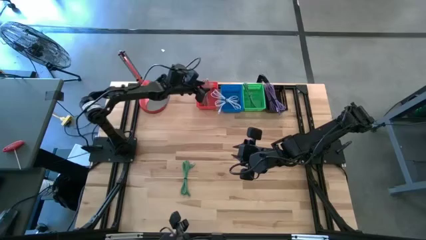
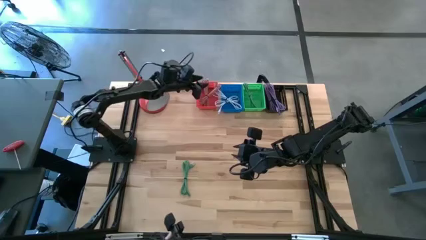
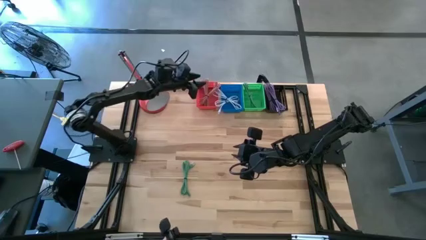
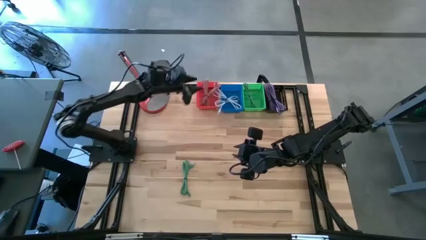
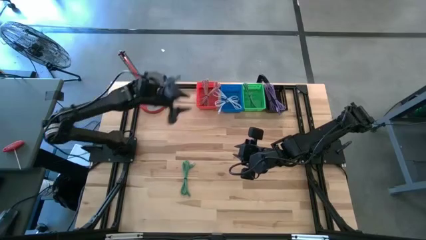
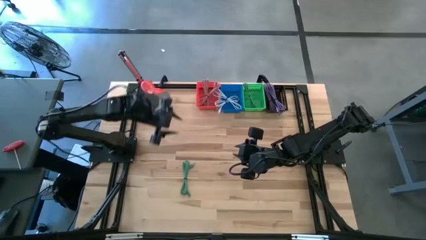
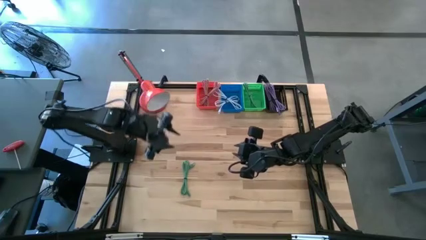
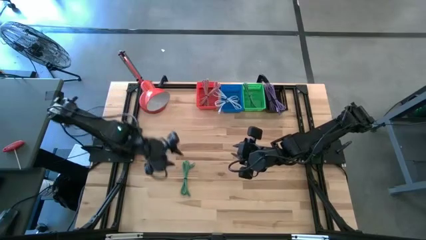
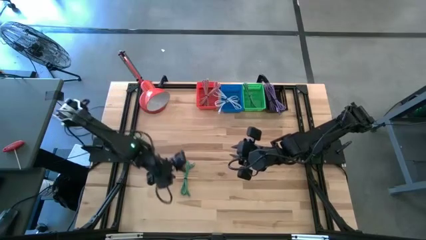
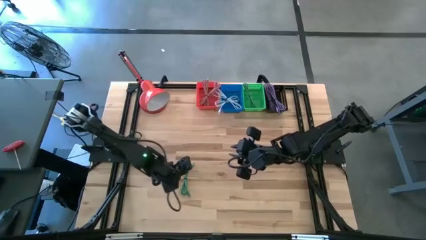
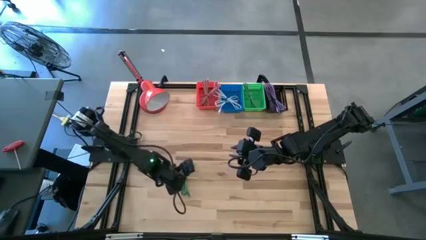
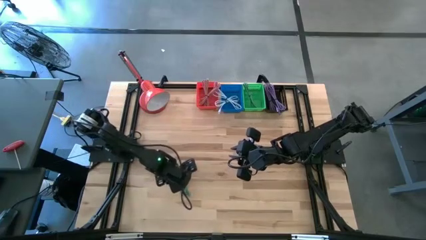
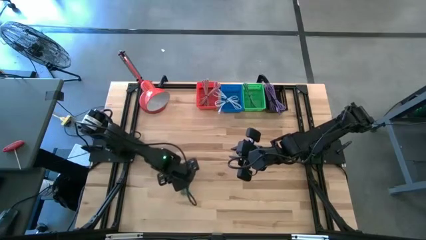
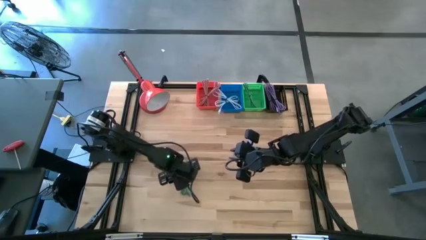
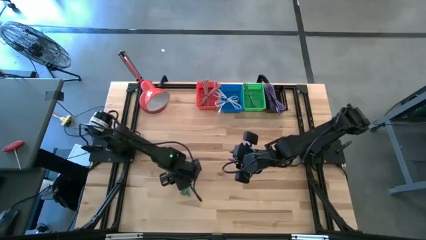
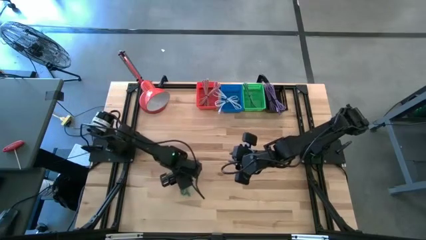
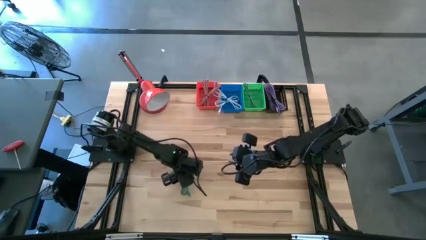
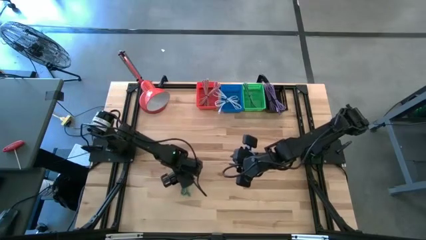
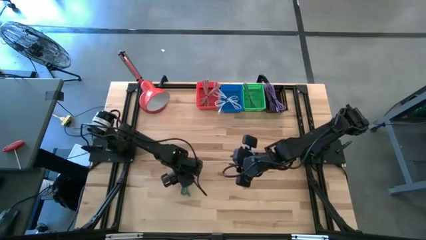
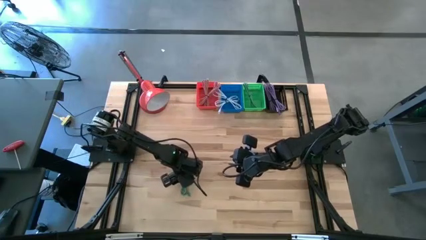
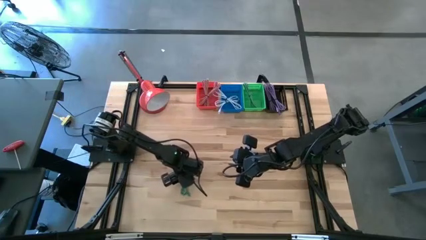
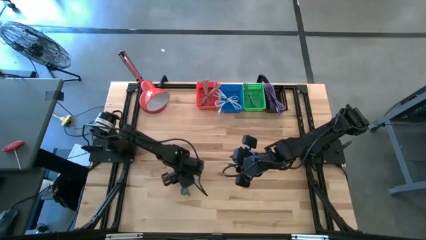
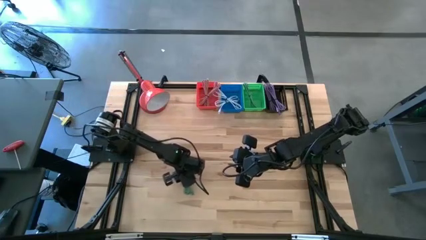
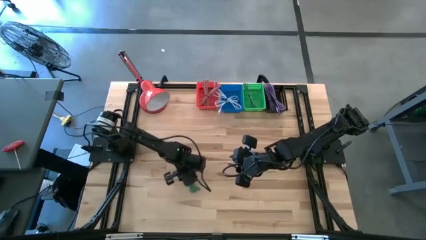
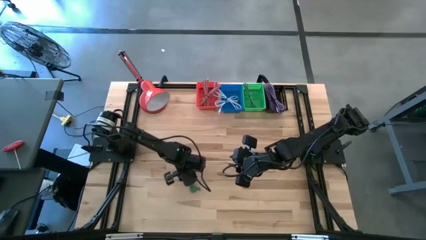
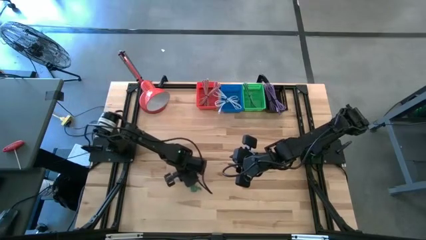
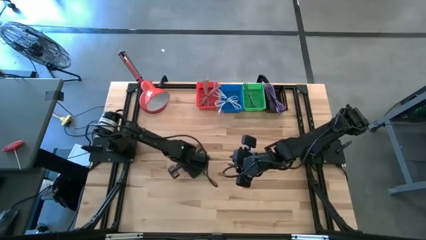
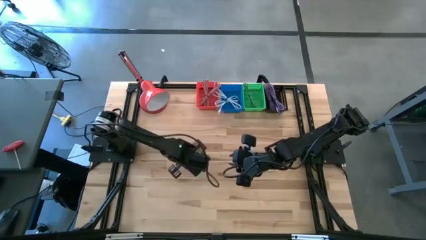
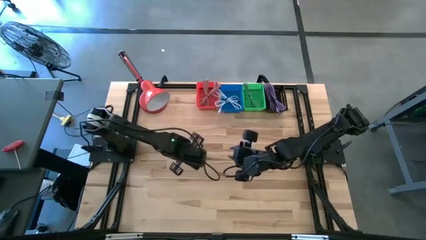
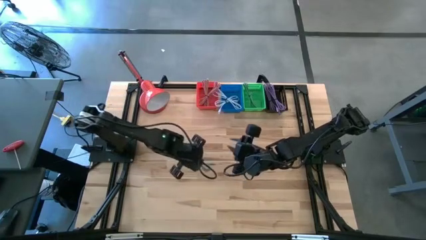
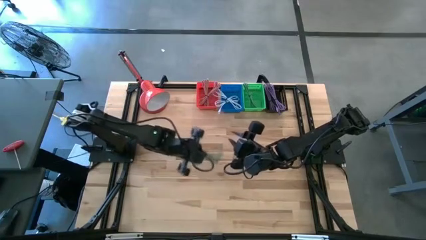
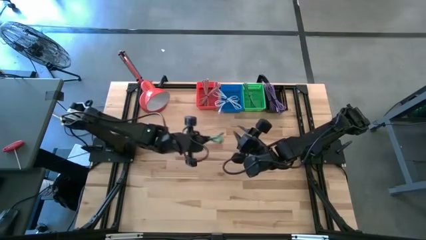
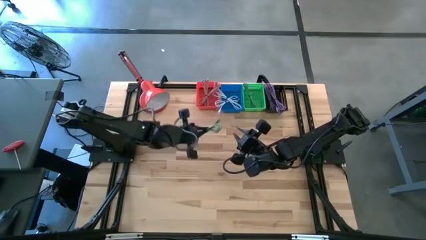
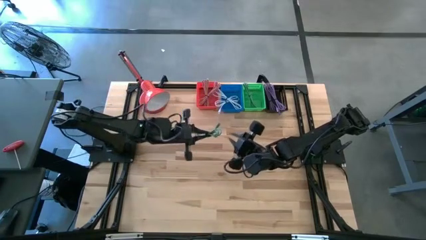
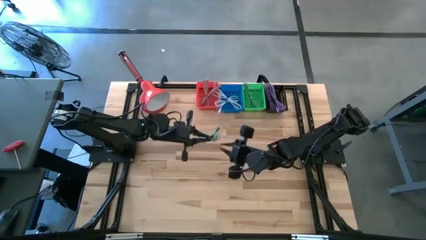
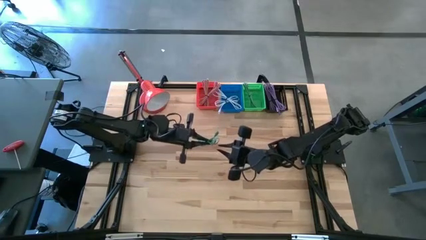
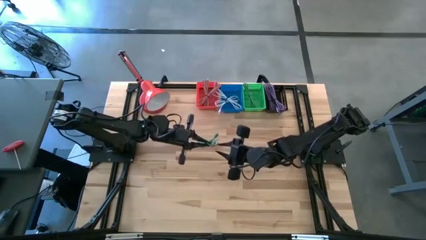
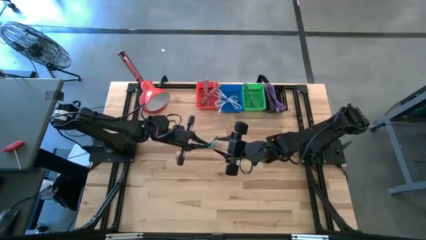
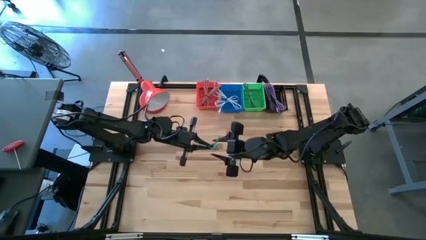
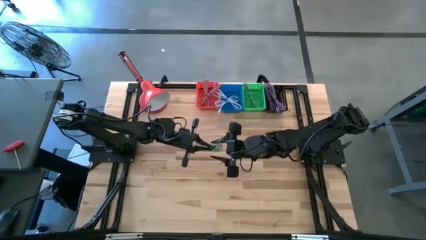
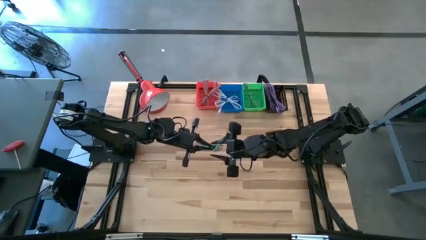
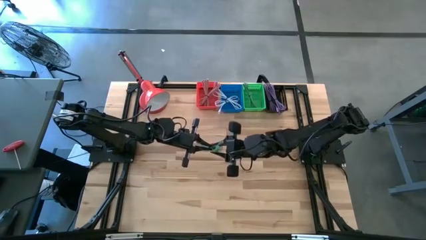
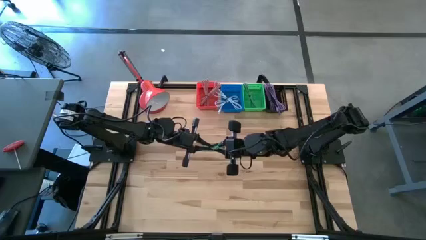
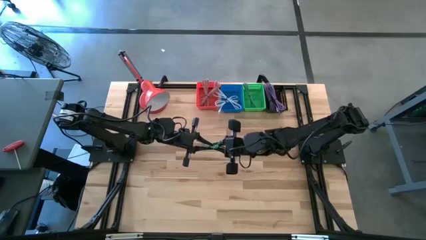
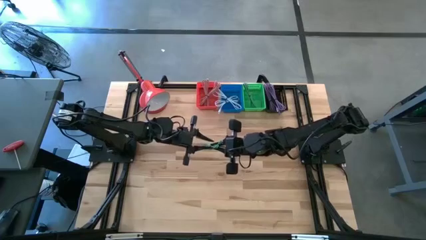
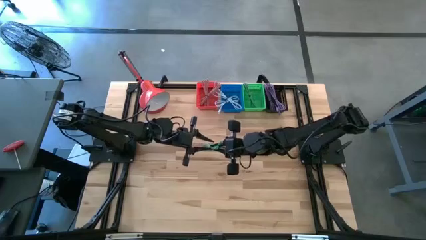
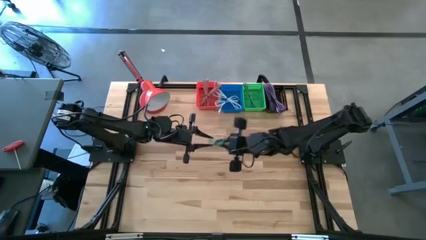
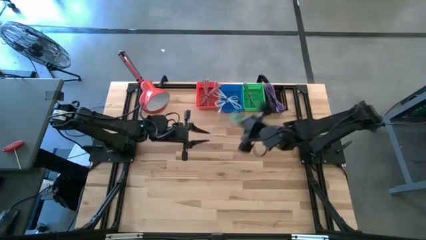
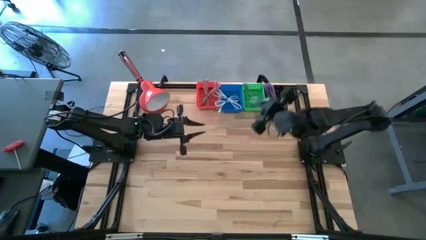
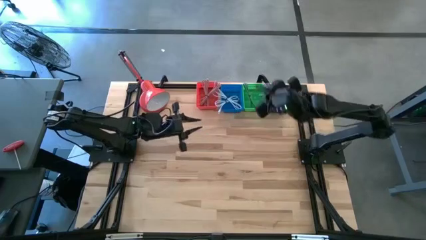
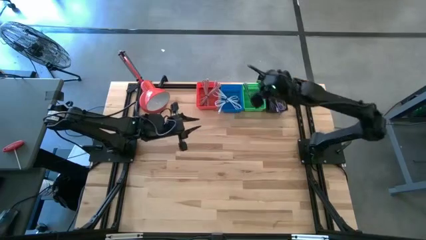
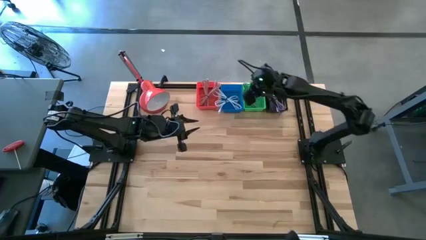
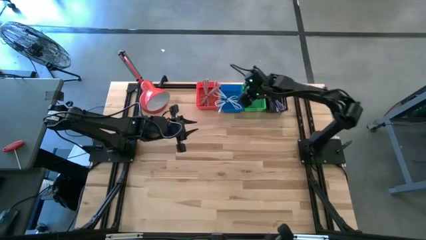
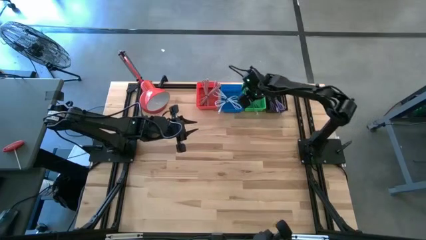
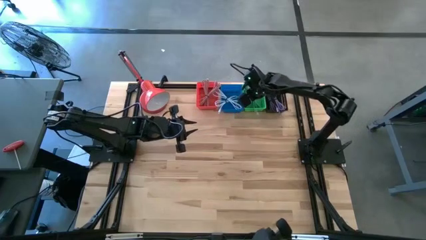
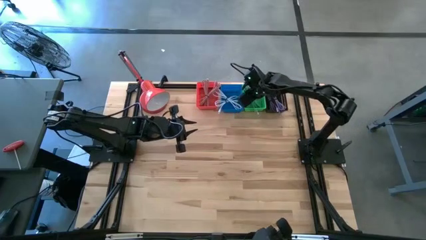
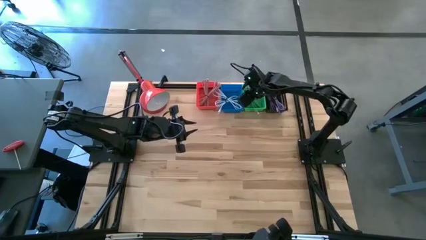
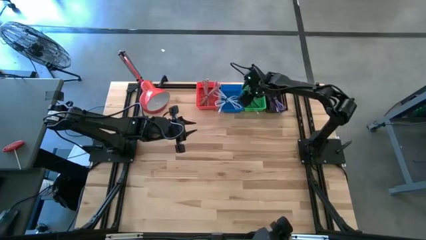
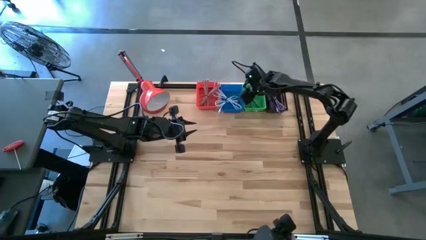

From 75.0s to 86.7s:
Task: Pick & Place USB Port
Put the green charger cable into the green bin

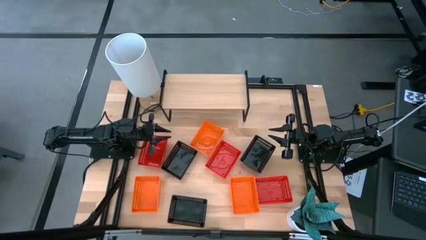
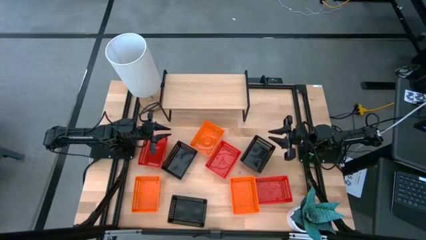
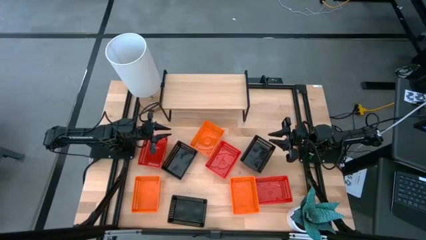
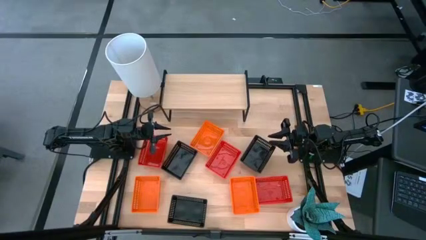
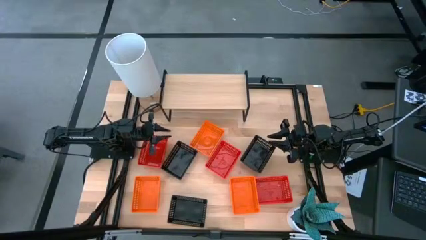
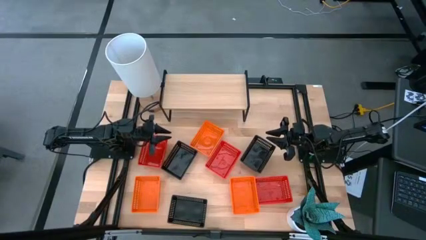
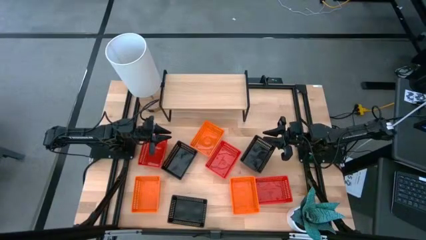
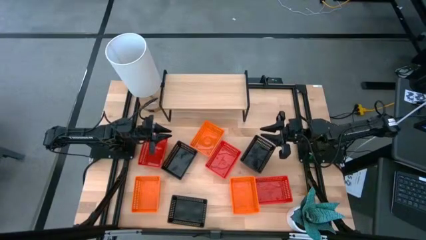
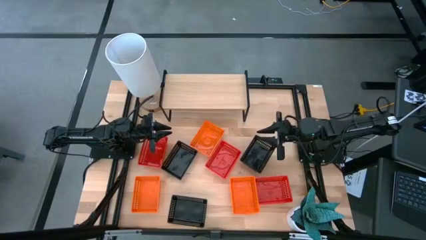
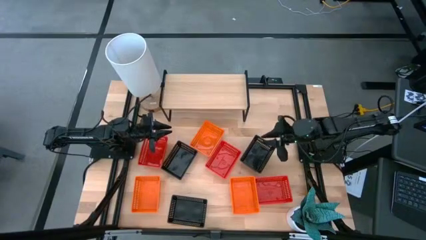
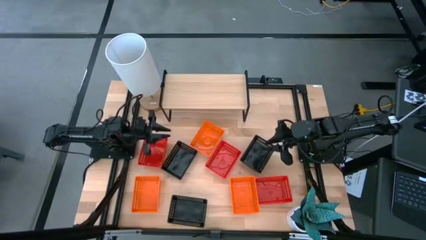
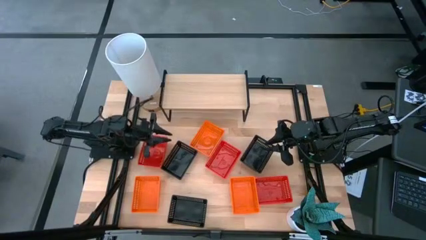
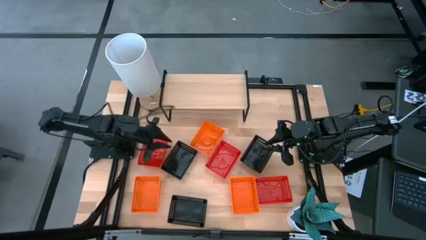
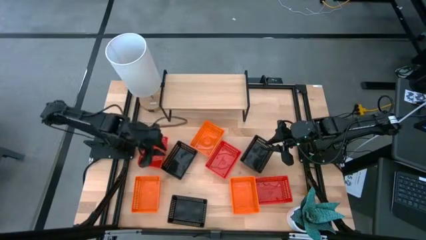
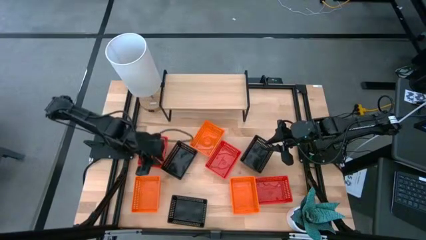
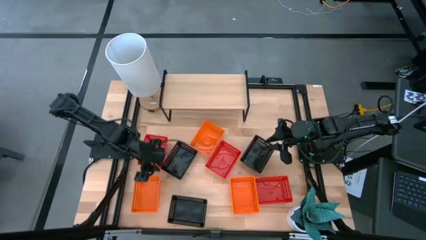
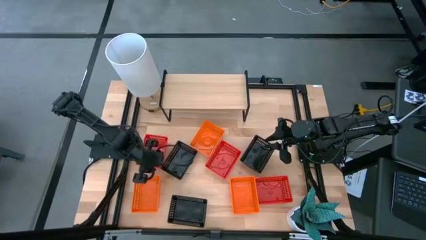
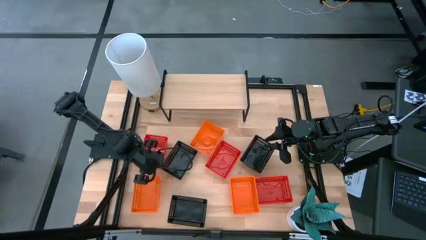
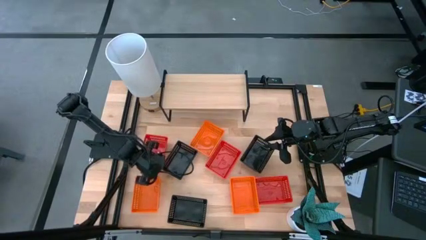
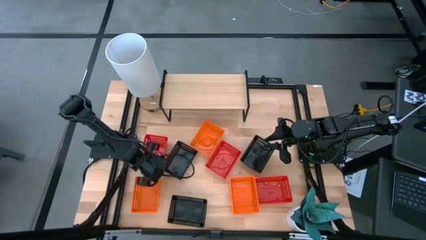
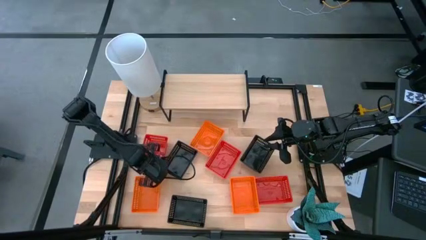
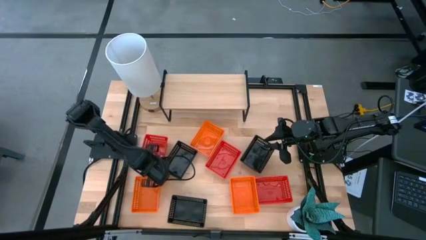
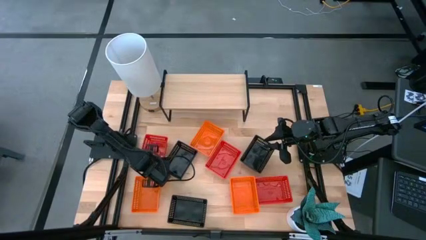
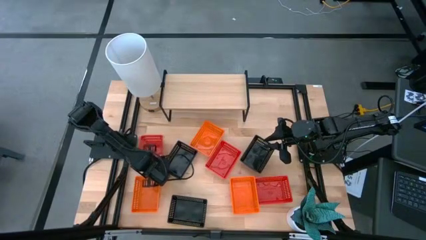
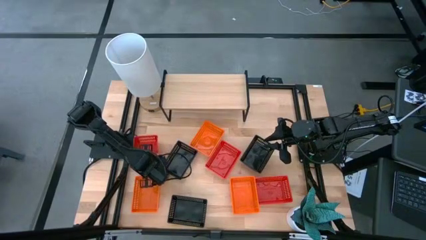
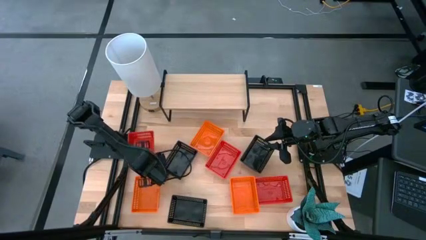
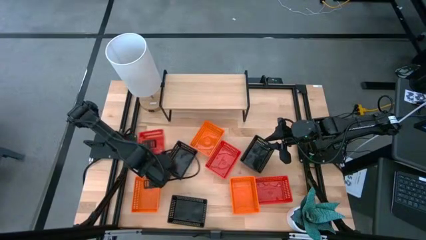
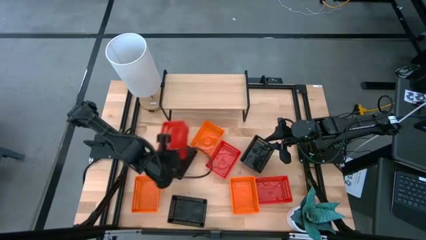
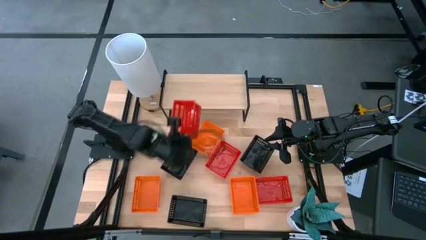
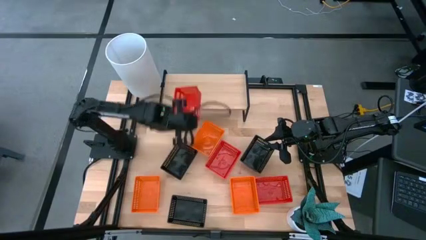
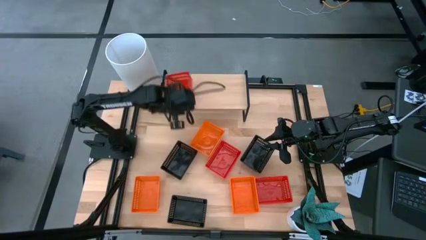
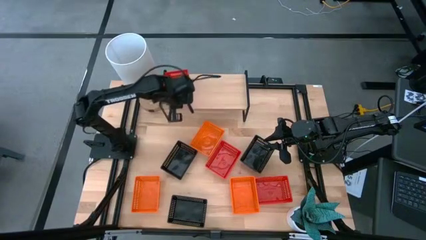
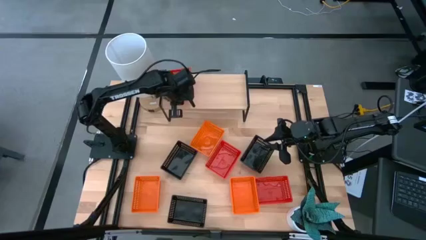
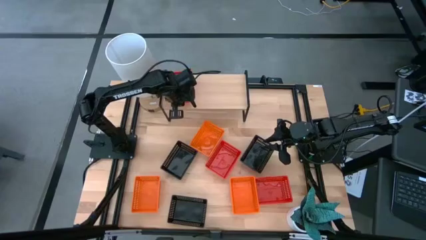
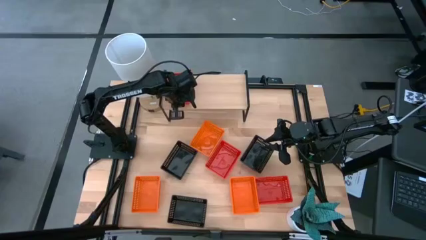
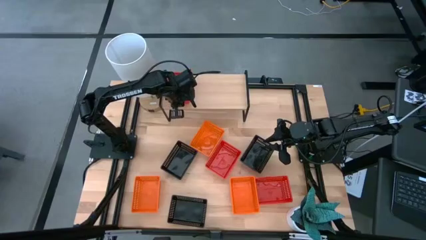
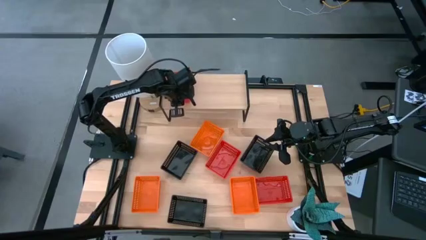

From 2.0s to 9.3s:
Task: Stack baskets on shelf by color
Put the top left red bin on the shelf
